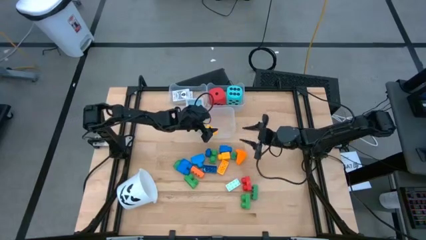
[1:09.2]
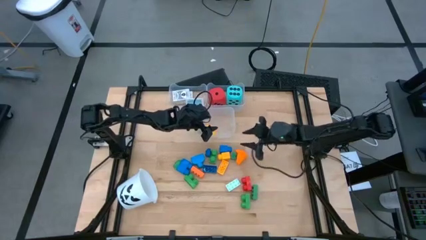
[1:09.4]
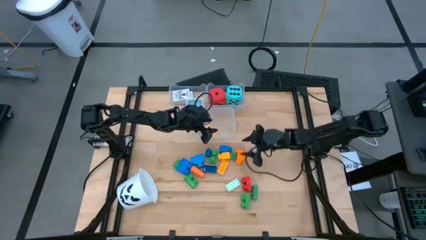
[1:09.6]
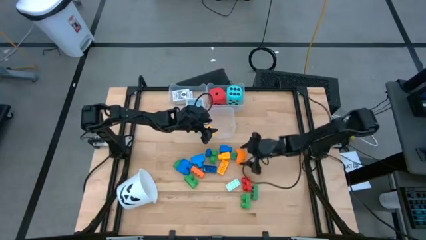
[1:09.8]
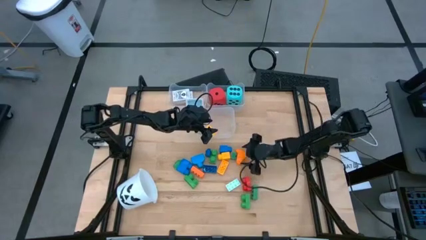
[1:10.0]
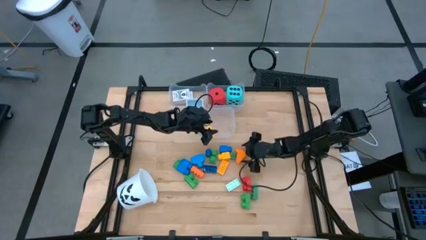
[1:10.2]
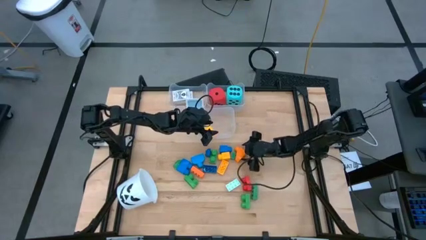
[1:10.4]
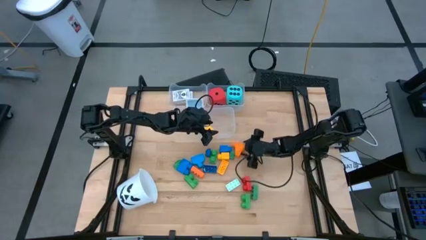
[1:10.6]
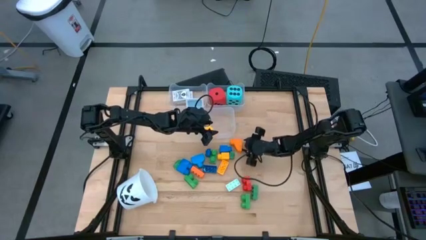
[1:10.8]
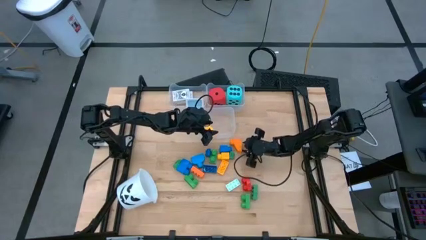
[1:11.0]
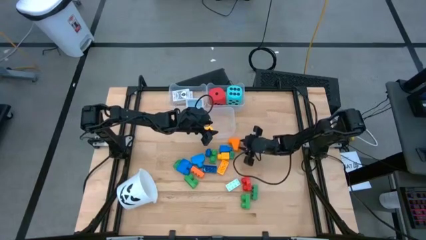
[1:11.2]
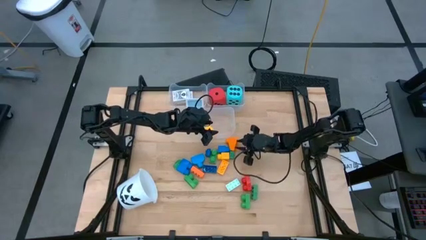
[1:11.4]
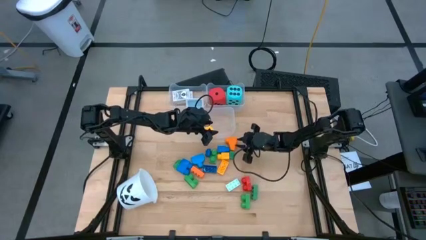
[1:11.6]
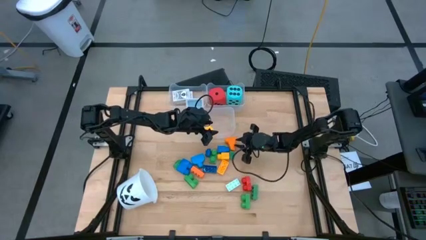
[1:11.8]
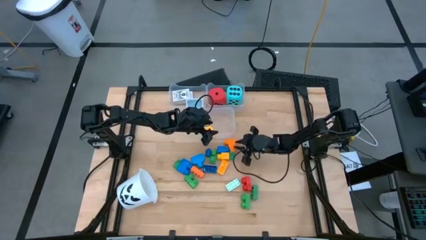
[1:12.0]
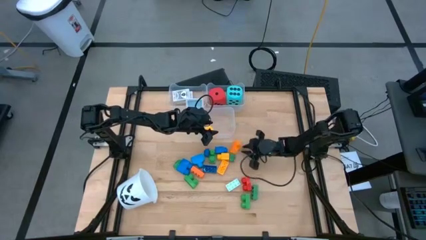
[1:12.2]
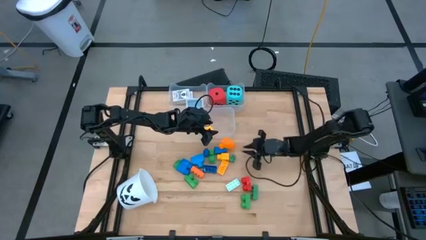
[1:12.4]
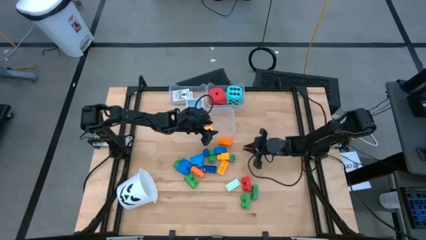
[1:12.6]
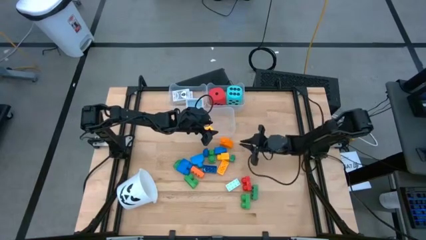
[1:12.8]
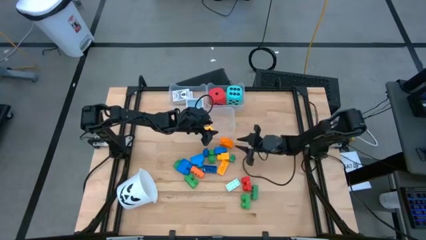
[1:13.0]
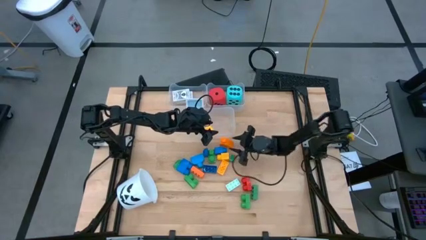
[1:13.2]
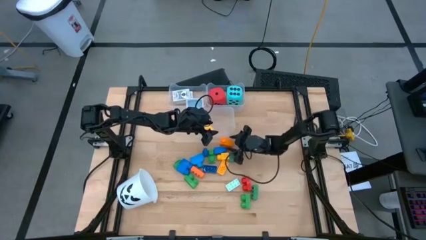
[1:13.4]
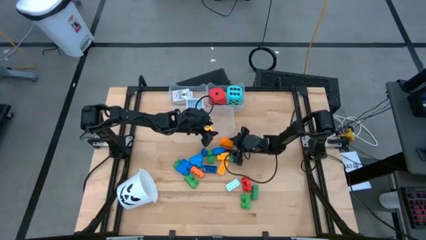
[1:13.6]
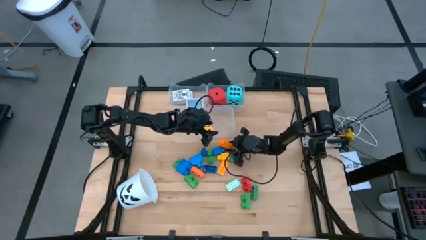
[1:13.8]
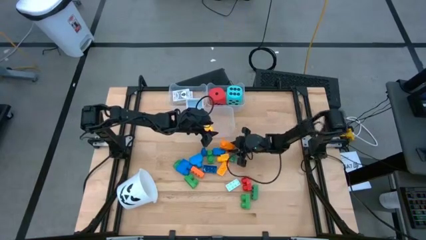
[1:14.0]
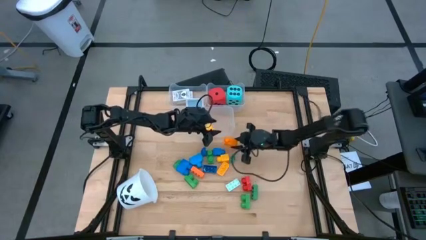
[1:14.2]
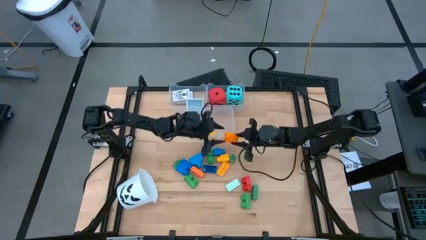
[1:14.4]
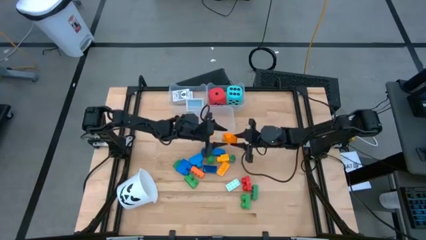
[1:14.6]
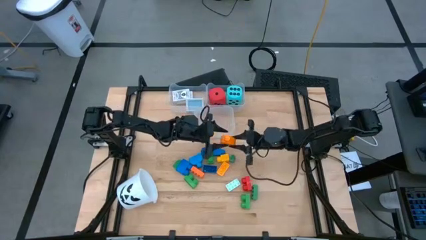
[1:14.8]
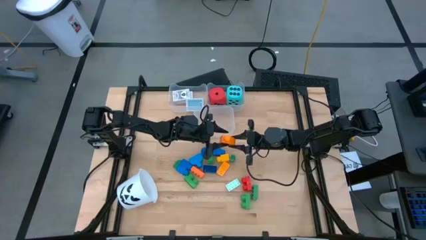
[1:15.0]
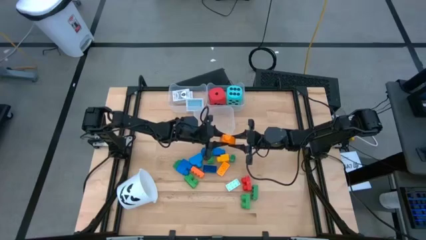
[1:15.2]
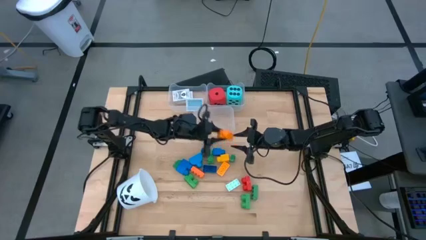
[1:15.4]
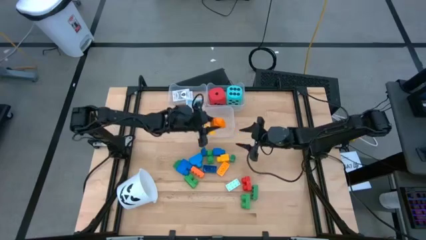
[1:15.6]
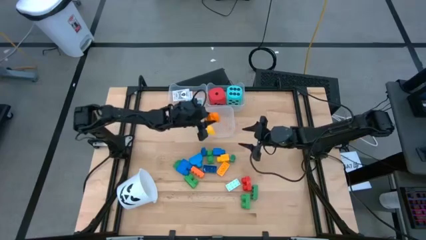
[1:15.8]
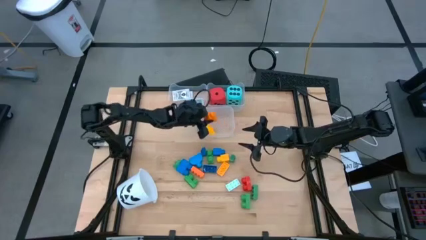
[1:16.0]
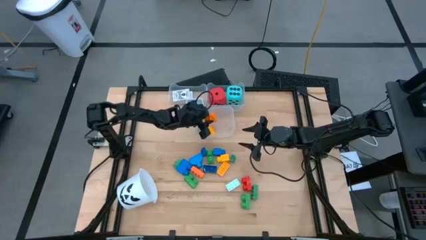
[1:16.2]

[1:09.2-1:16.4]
Task: Pick & Place Toys
Put the orange game piece into the bottom transparent bin

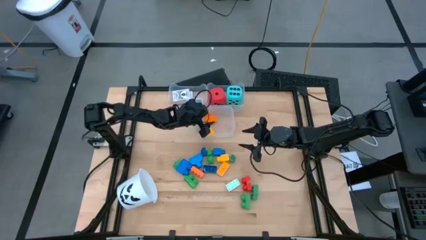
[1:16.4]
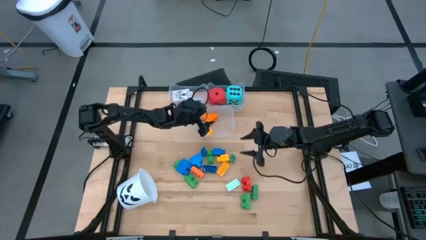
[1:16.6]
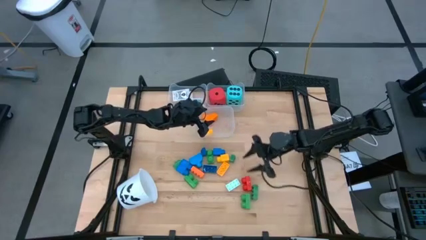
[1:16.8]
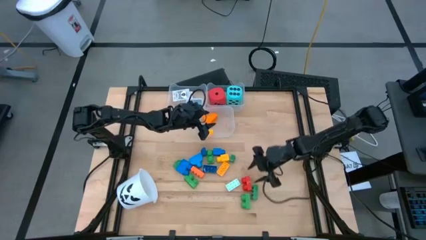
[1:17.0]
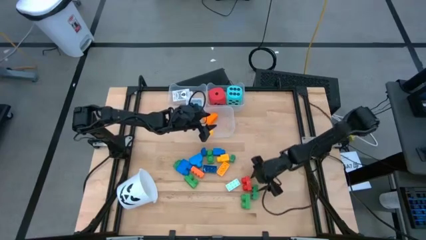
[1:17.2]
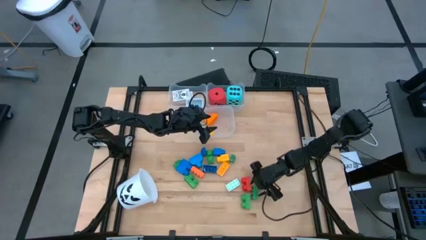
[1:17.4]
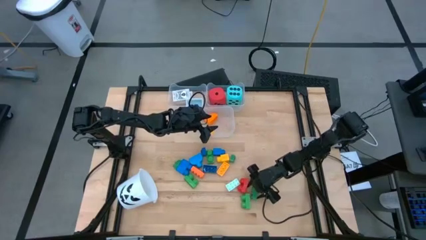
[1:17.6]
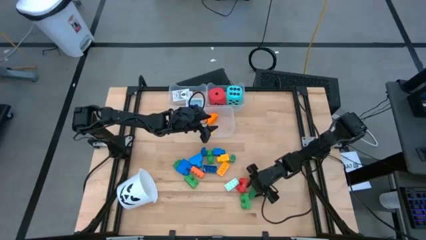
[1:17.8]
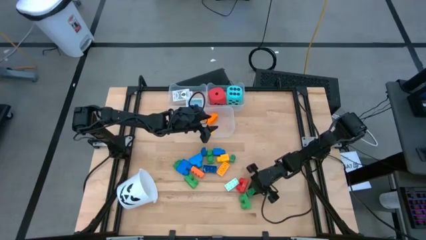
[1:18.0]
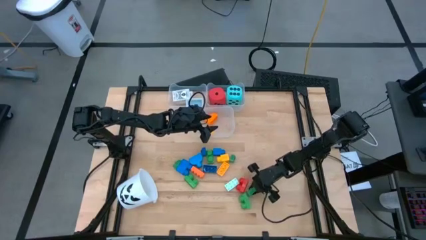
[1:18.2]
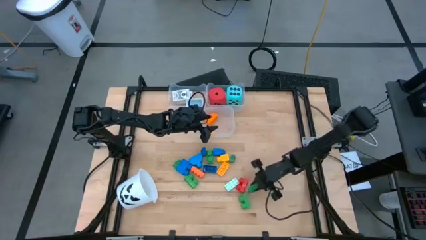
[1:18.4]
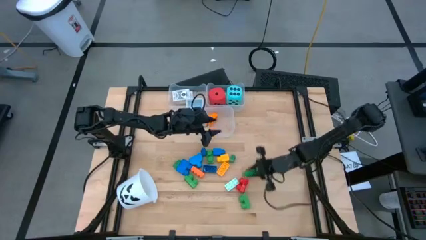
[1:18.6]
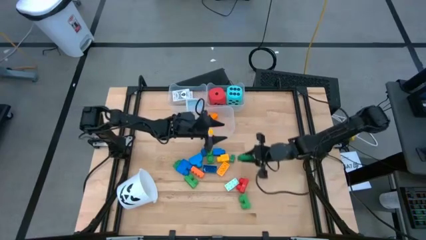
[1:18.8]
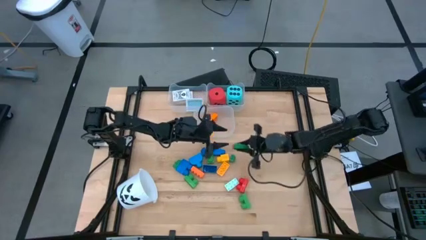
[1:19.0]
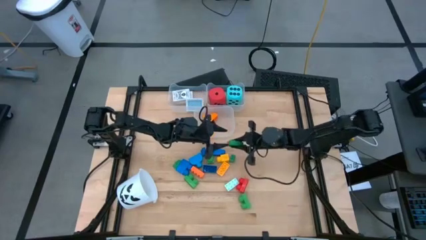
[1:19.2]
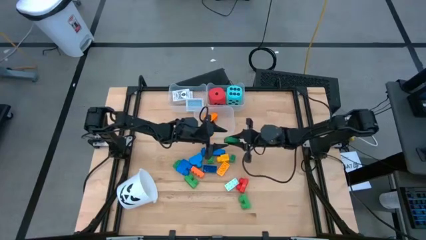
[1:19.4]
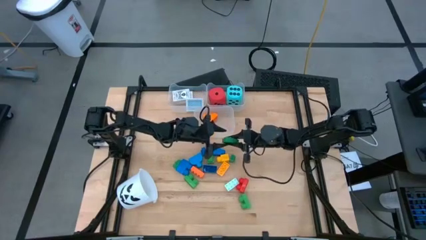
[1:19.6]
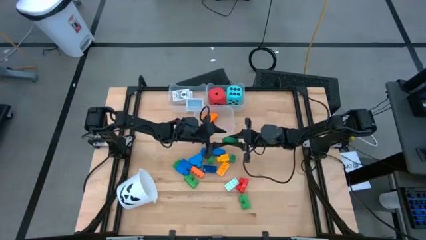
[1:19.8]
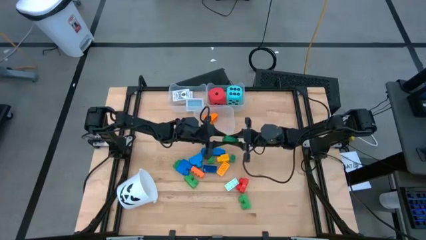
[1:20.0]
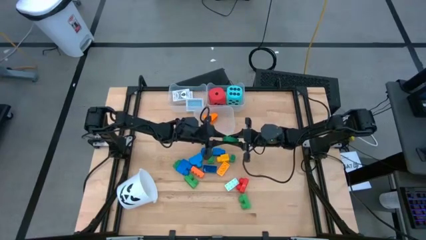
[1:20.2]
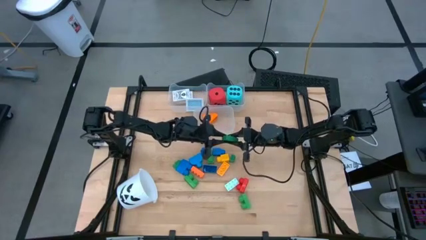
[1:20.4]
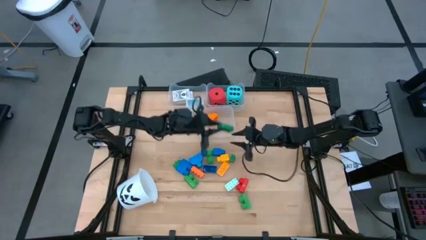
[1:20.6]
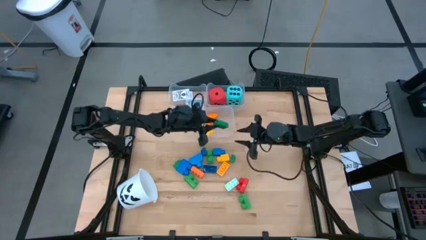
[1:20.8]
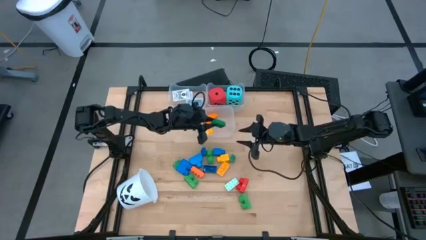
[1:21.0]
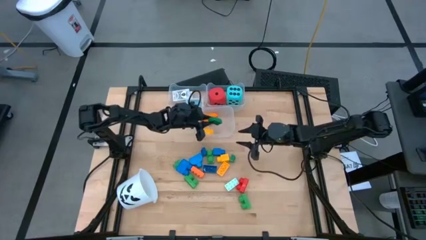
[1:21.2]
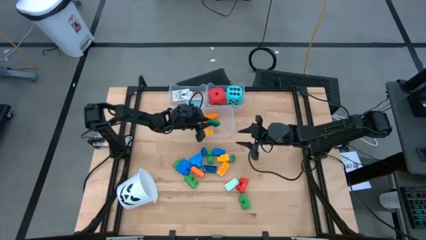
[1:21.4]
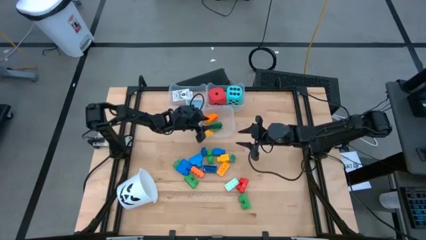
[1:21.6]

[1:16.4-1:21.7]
Put the green game piece into the bottom transparent bin

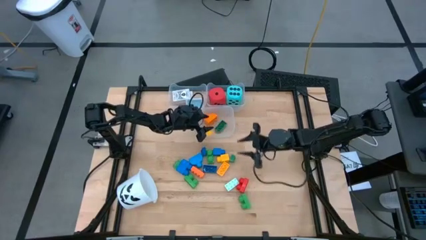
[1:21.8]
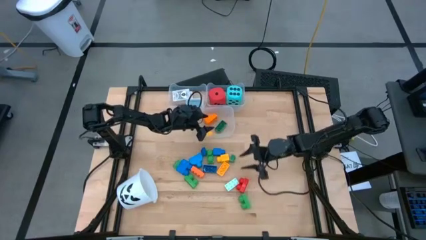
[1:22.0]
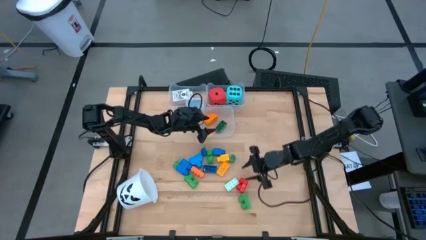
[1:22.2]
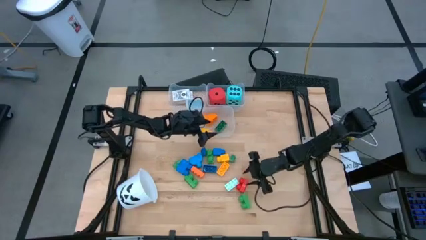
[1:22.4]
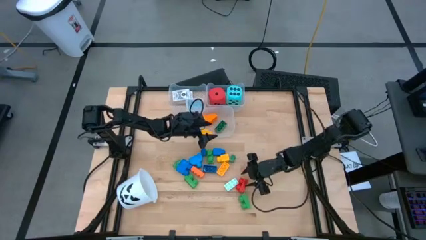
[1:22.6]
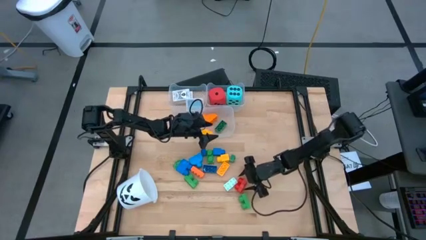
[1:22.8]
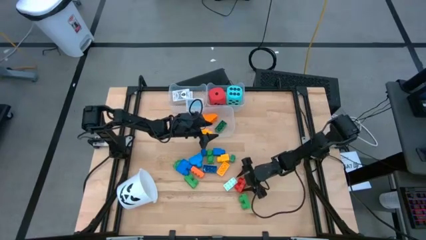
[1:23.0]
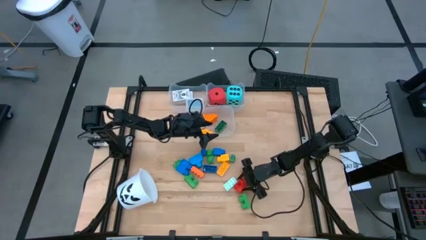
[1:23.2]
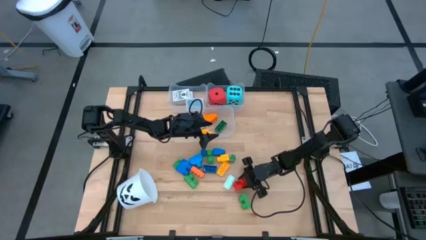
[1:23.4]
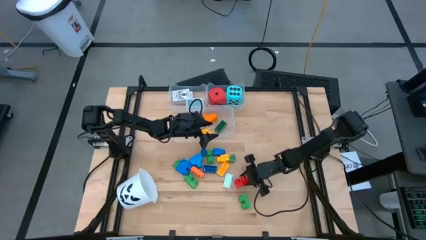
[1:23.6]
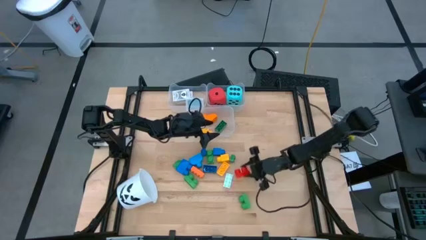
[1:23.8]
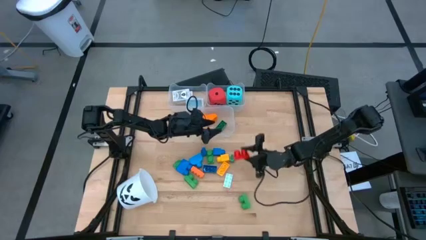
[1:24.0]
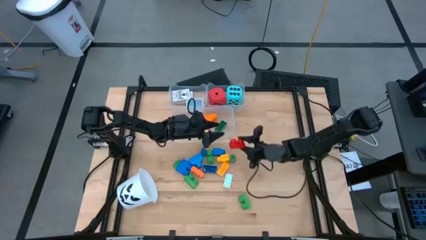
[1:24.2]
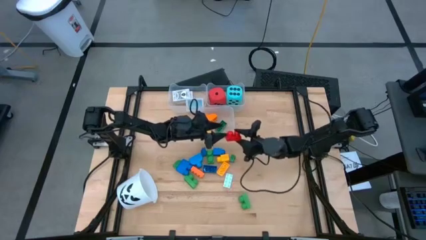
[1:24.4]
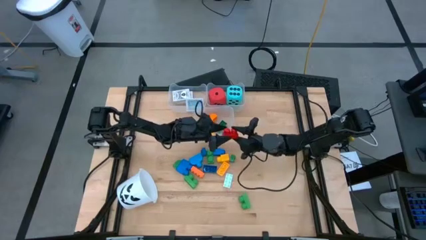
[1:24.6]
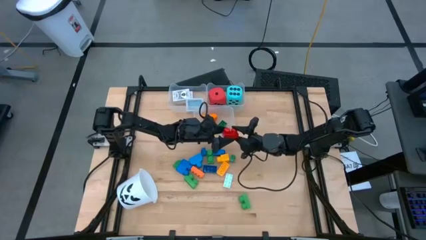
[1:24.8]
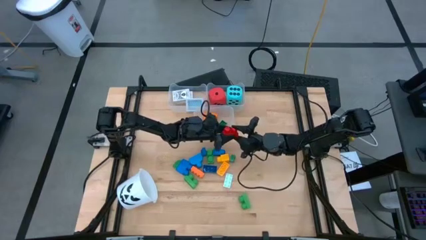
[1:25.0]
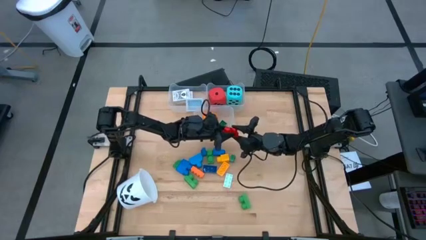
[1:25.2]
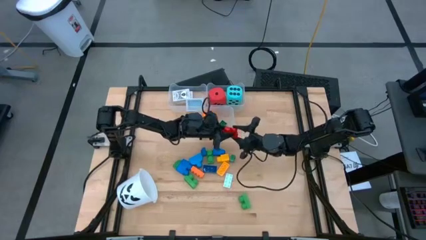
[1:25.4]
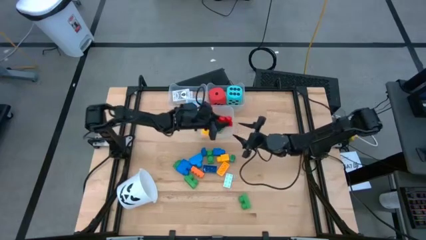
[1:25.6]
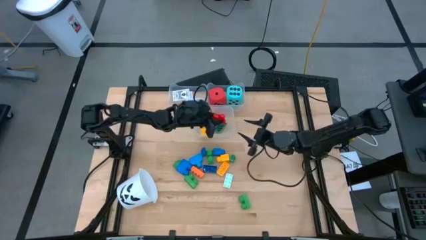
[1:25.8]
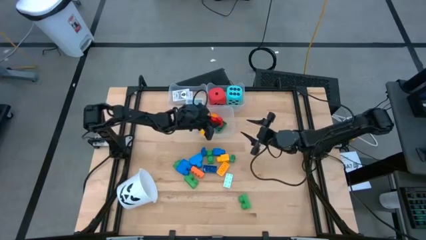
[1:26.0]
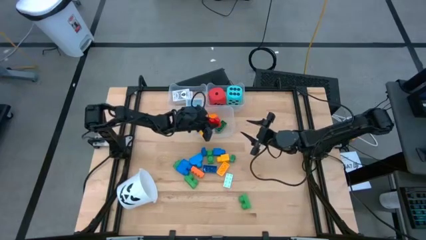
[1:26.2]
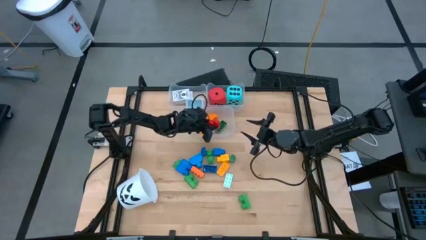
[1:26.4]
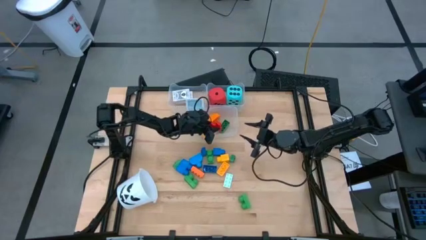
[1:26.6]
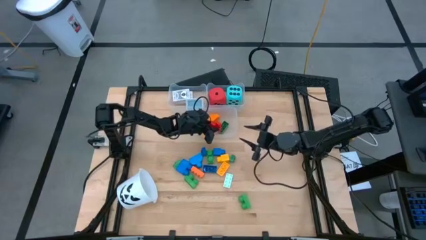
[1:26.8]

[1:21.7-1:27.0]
Put the red game piece into the bottom transparent bin
